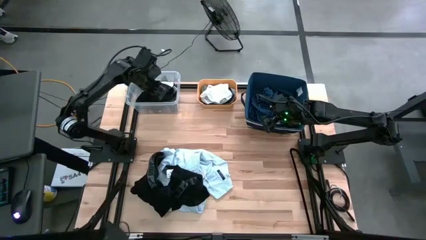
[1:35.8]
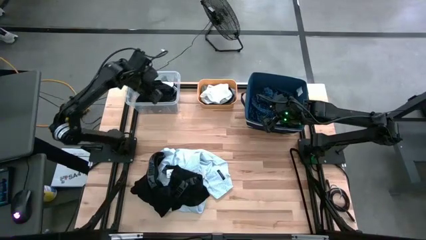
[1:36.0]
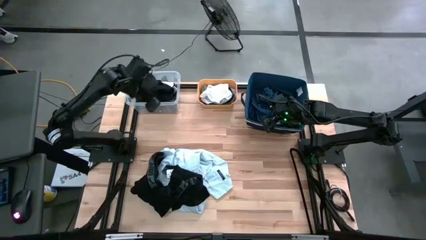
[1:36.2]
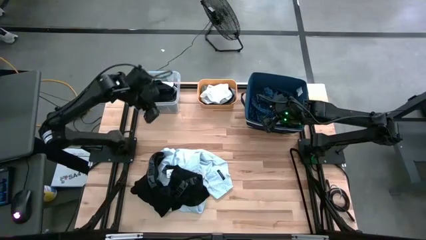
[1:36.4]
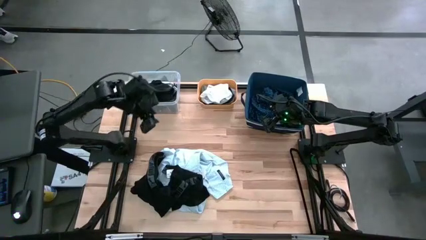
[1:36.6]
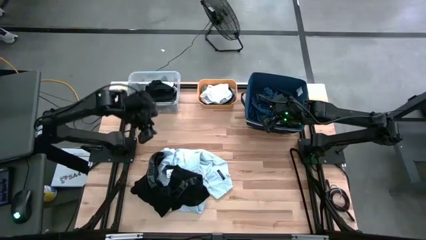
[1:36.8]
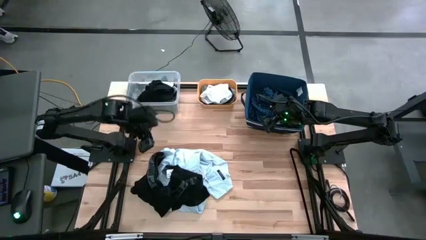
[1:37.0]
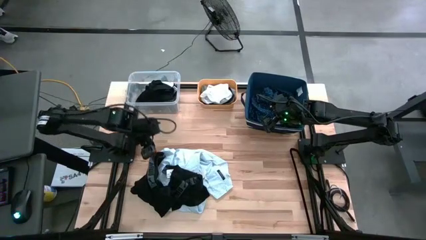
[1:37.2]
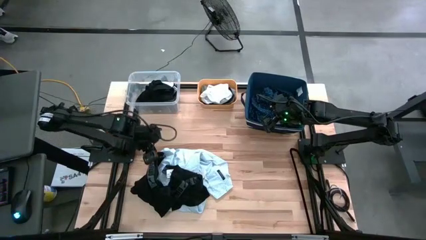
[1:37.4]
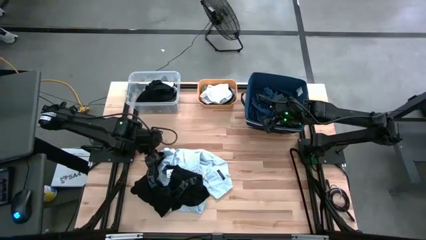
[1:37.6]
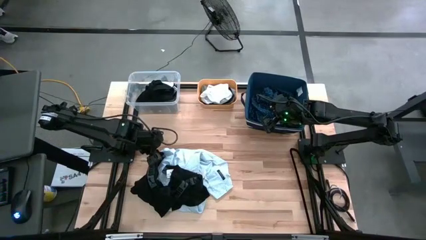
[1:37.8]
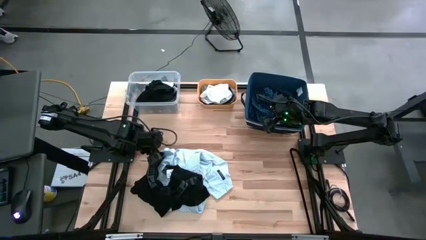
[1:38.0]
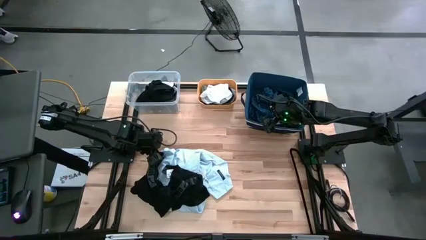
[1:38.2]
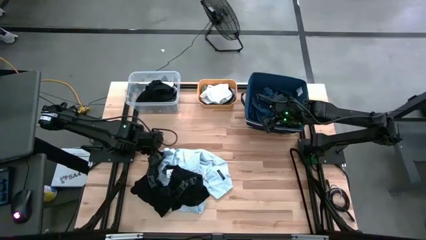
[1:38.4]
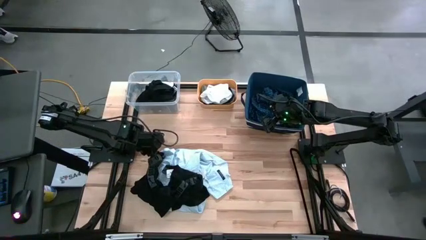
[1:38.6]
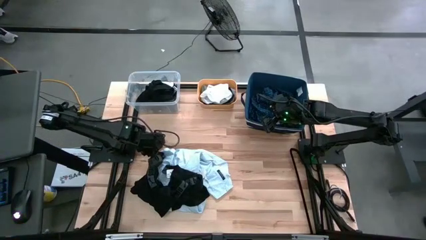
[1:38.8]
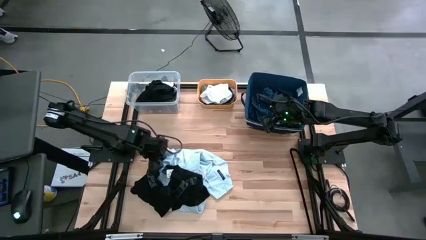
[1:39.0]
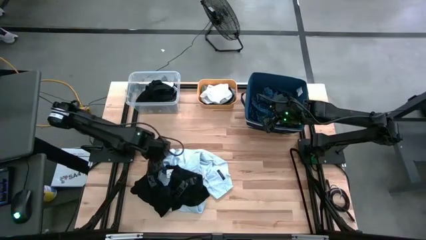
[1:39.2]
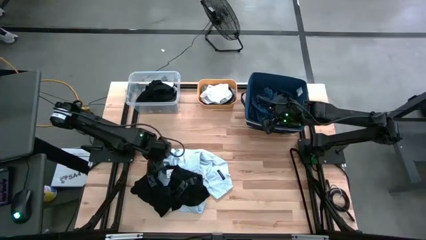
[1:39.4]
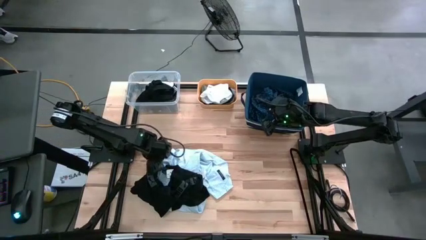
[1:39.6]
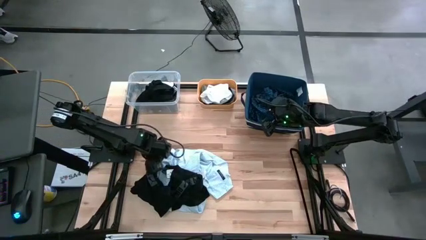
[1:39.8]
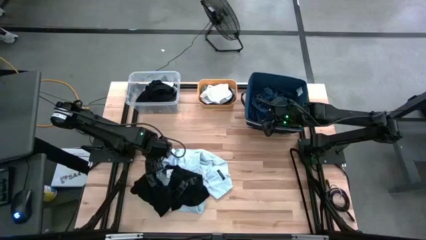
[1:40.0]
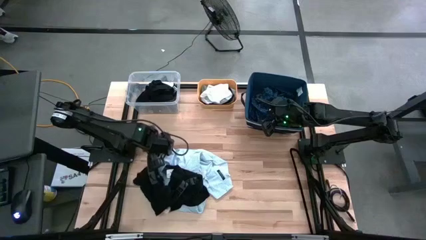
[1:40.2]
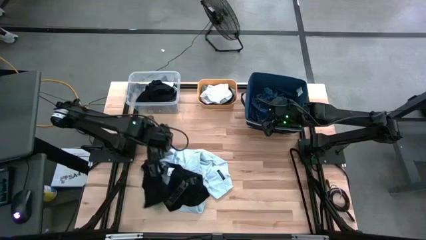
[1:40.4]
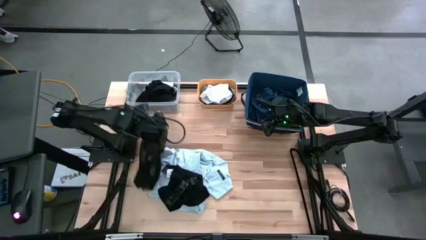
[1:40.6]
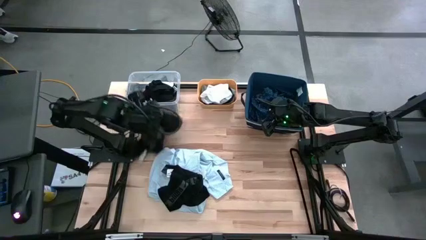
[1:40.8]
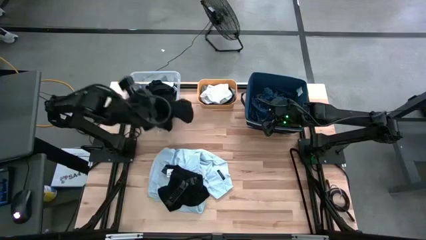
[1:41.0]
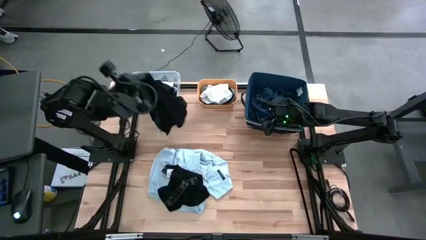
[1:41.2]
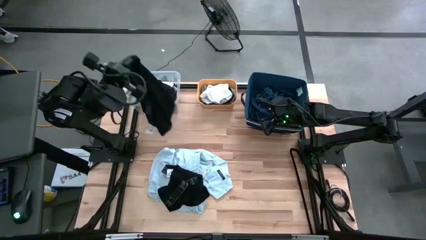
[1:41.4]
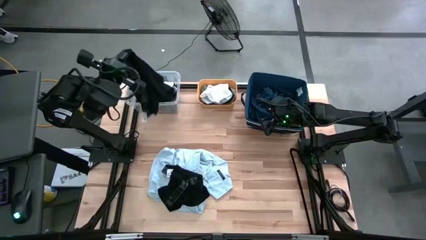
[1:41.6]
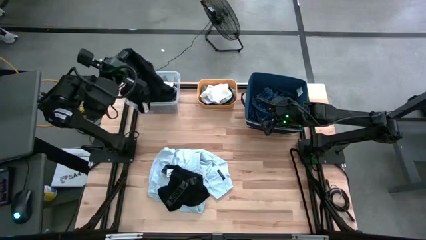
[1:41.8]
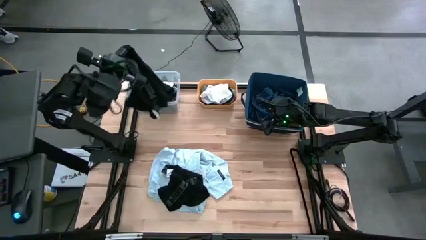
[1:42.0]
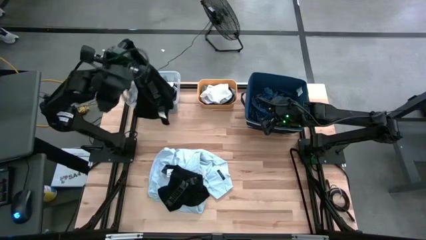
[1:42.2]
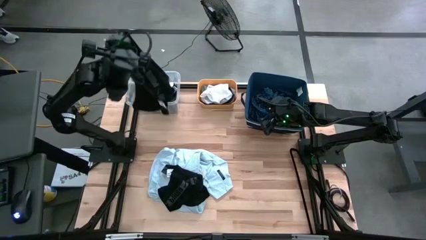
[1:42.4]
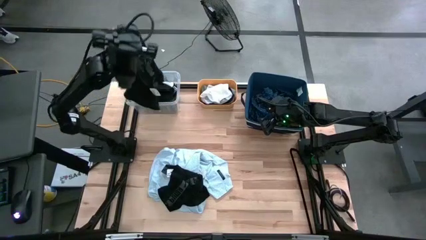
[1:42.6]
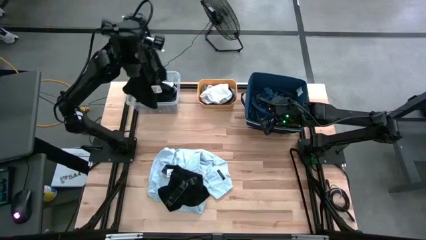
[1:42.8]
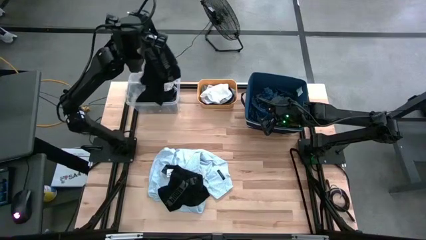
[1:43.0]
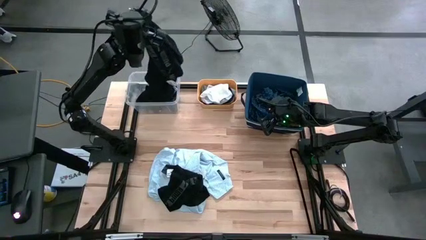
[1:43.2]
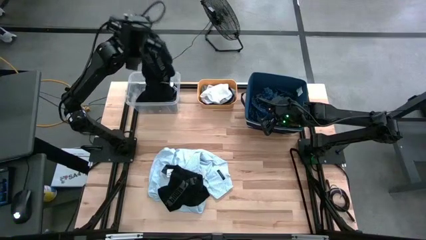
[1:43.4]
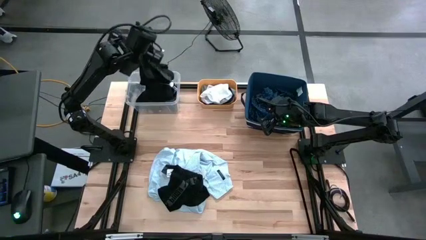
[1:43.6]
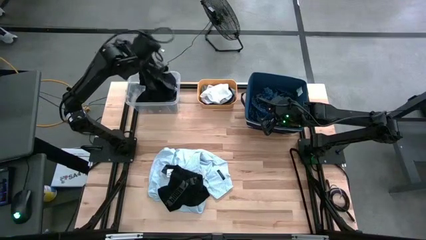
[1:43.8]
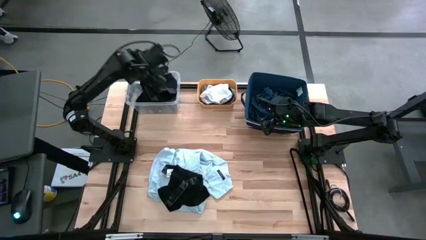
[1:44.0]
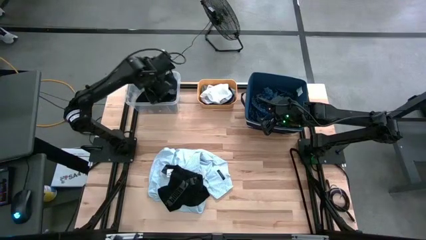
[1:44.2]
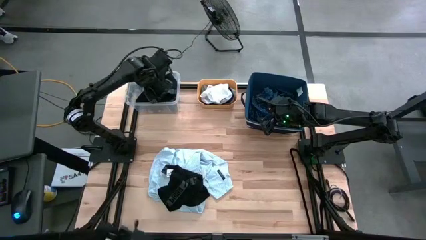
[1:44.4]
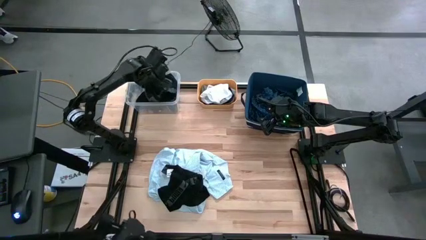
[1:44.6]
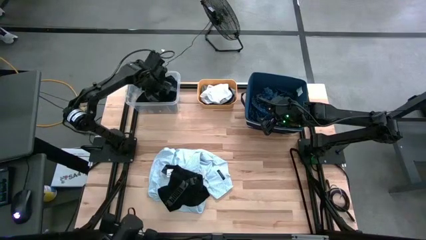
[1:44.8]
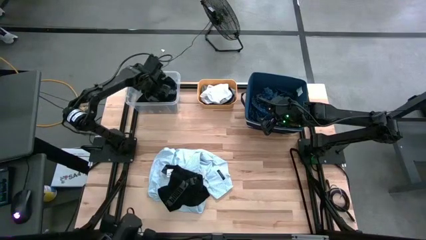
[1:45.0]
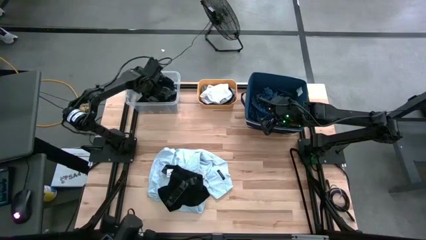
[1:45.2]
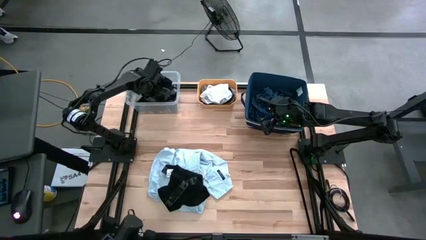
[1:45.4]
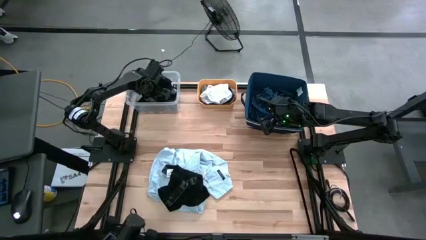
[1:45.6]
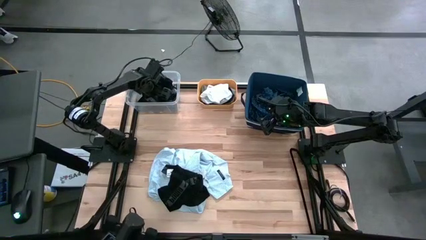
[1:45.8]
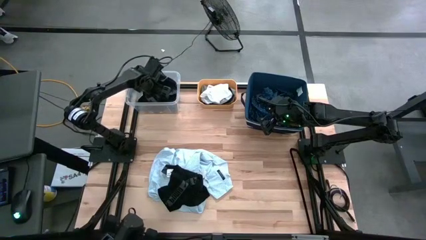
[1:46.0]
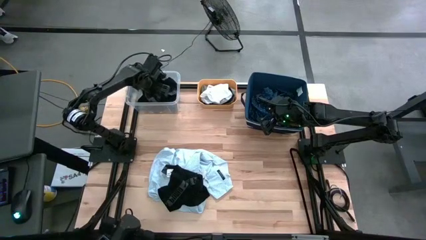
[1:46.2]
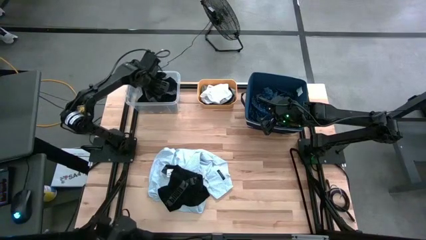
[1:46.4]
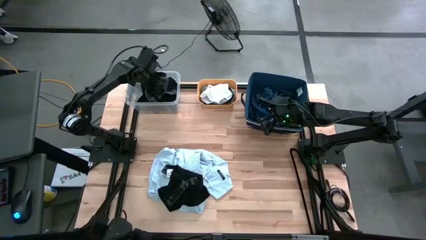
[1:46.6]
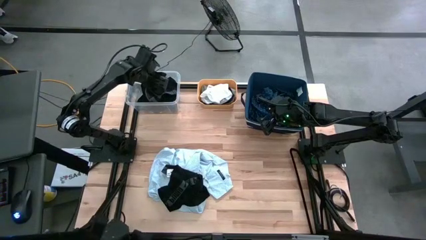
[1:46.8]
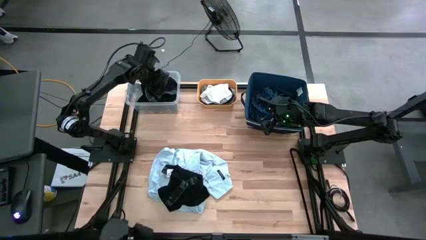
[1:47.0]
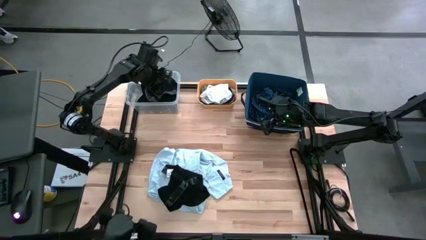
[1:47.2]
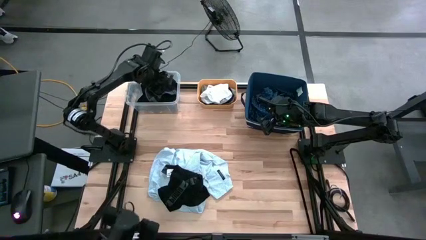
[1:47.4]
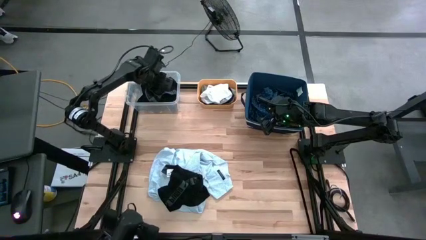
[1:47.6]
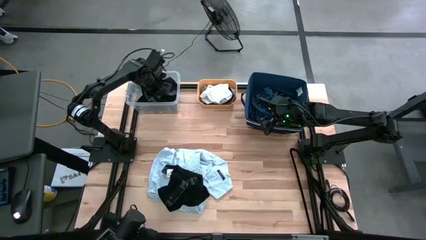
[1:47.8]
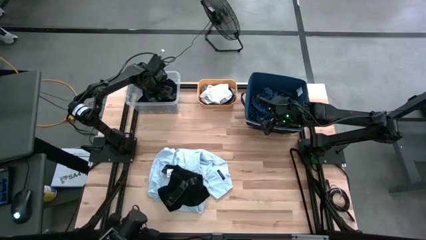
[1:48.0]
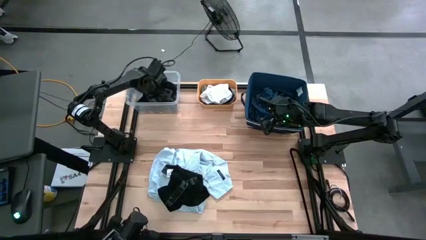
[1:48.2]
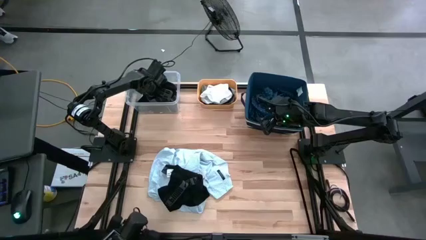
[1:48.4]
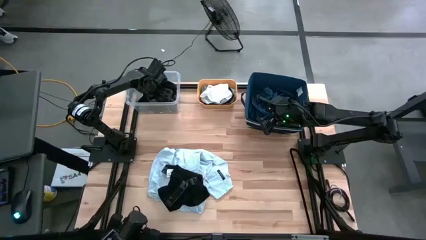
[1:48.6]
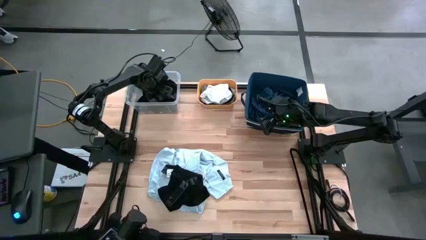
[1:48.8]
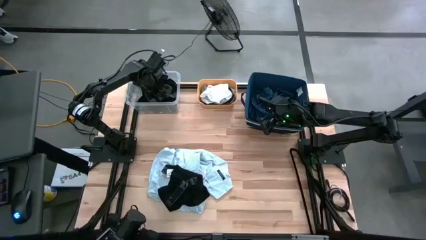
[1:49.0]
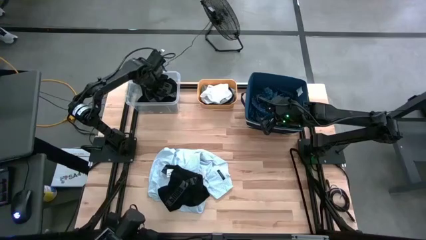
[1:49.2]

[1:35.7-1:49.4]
Task: Pick & Place Cloths
Put the black underwear into the transparent bin
